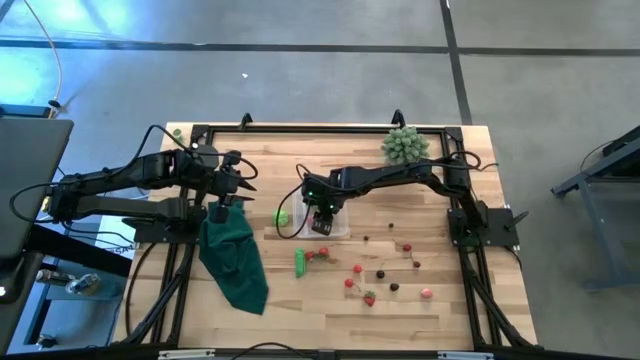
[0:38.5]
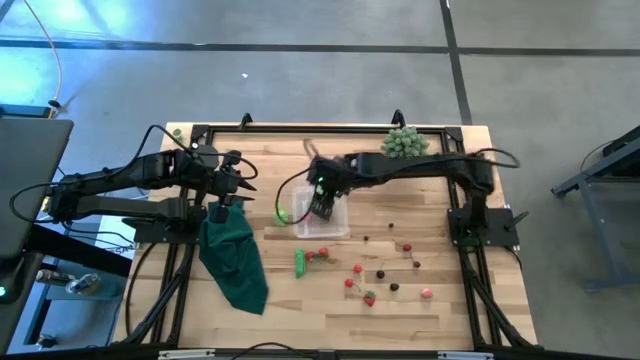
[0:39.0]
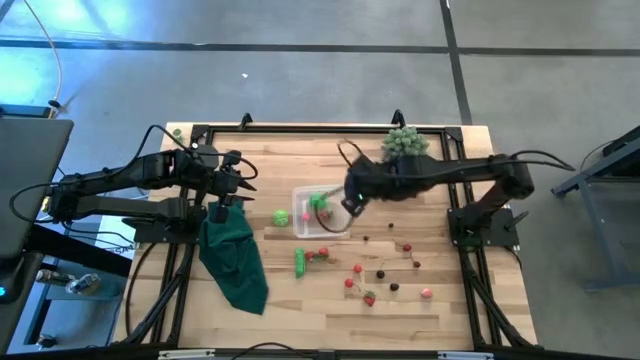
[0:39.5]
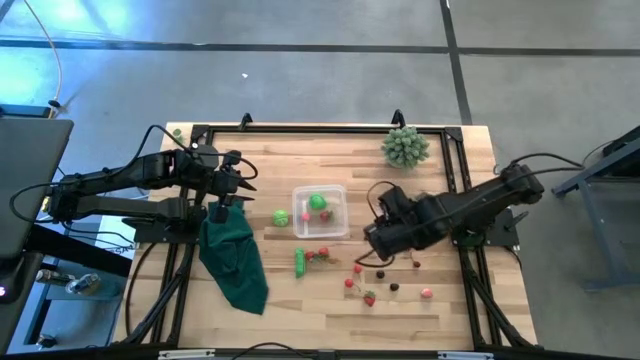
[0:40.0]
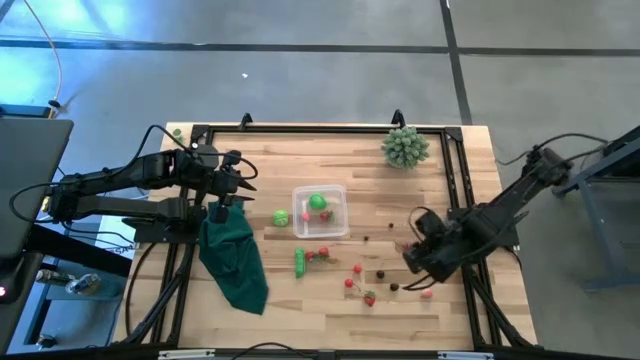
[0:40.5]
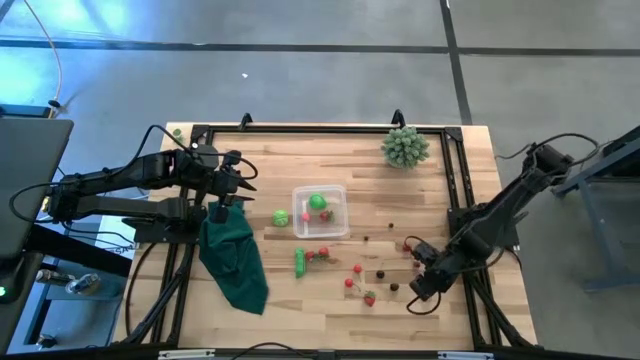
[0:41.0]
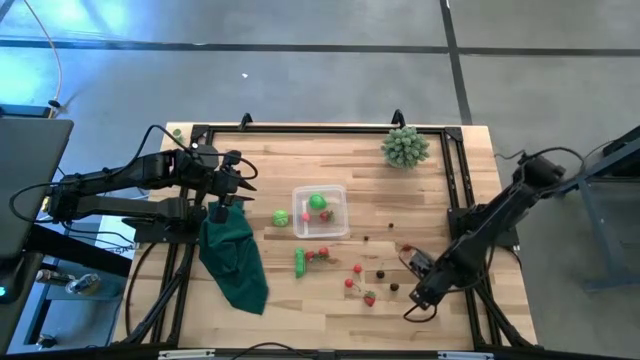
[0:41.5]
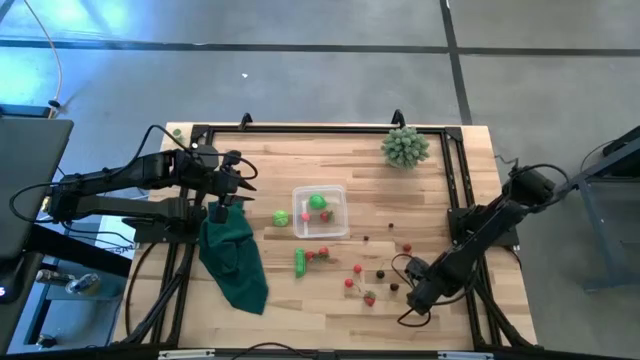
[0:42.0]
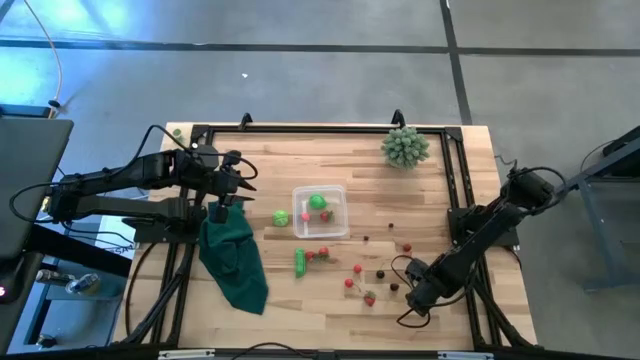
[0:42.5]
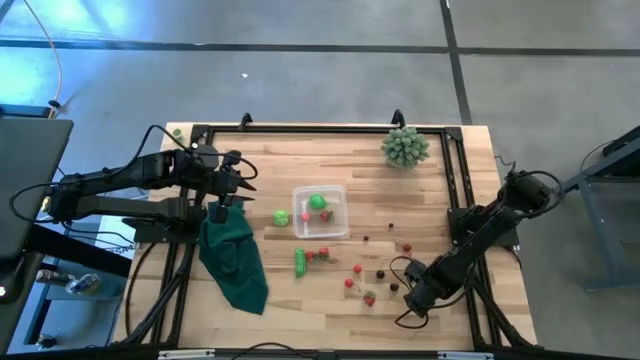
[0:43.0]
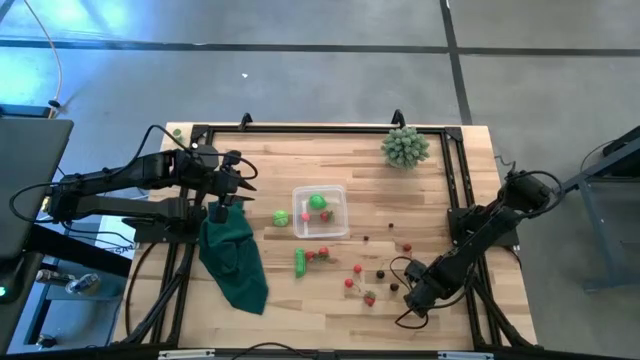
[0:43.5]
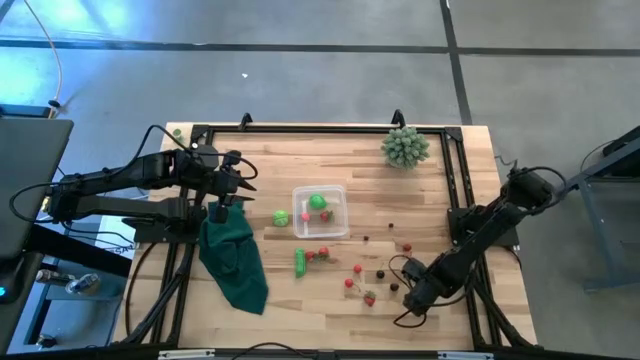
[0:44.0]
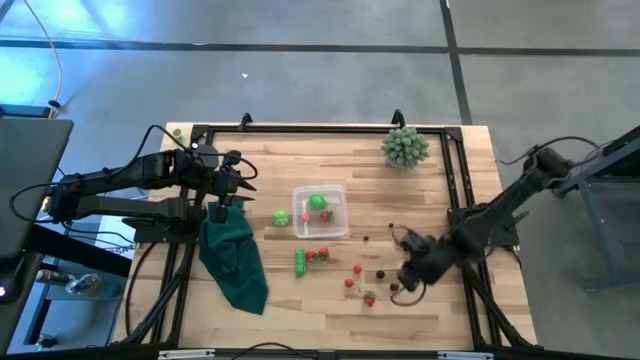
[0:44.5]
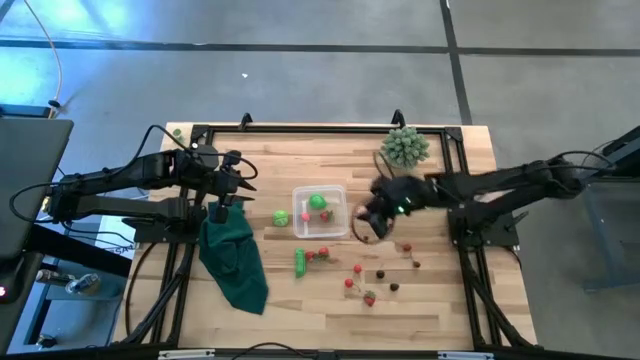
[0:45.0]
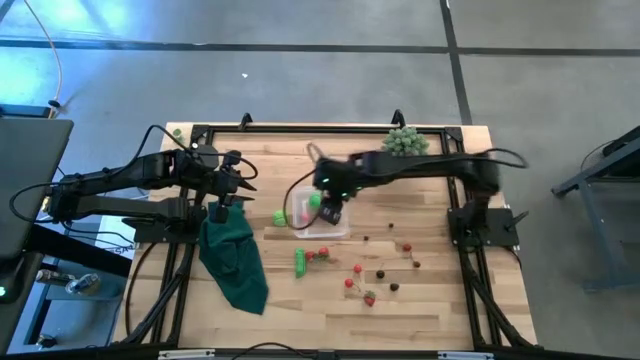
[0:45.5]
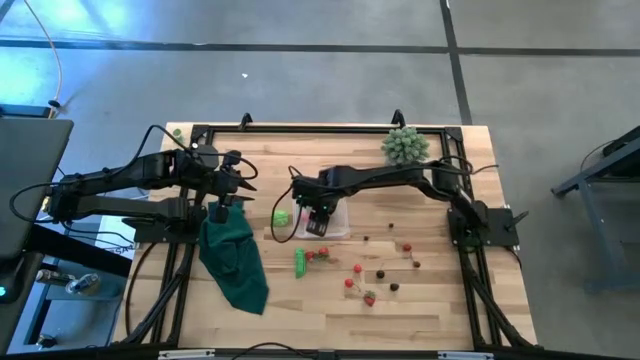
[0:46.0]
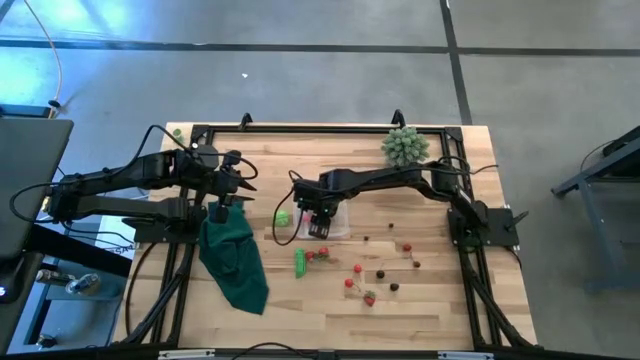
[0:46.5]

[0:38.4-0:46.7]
Task: Pick and placing Produce into tupperware
Put the peach into the transparent bin

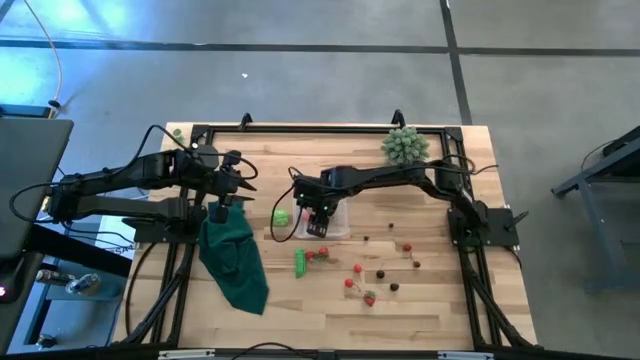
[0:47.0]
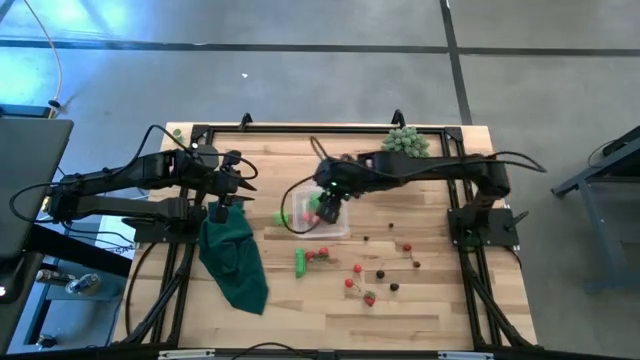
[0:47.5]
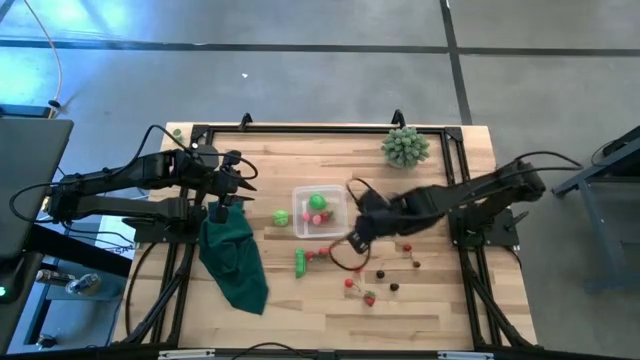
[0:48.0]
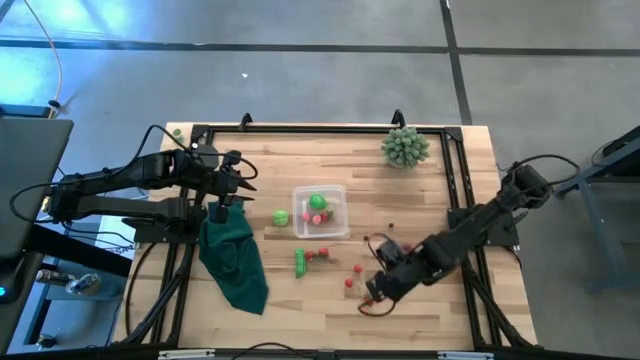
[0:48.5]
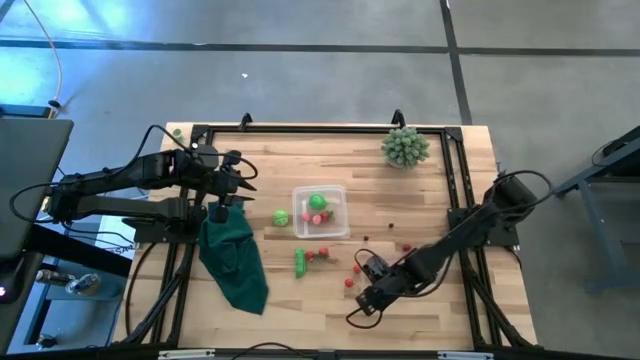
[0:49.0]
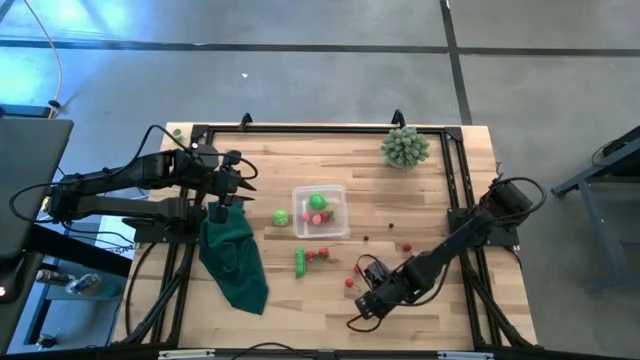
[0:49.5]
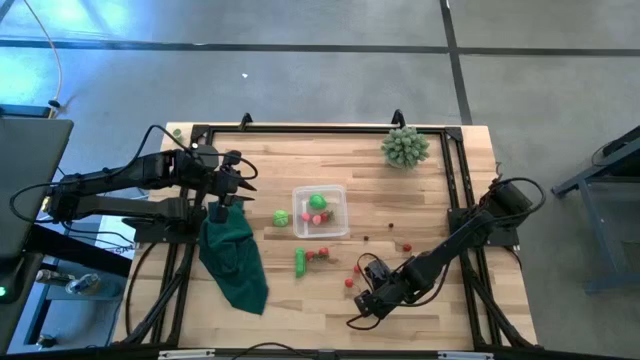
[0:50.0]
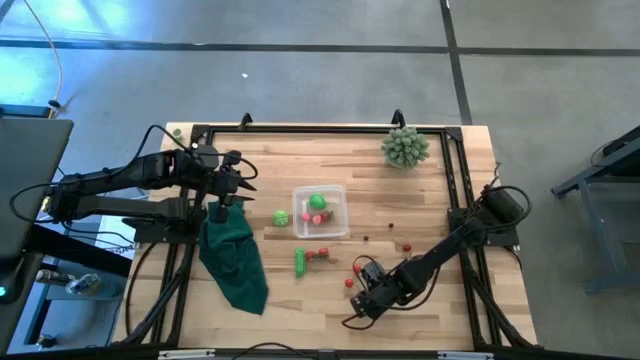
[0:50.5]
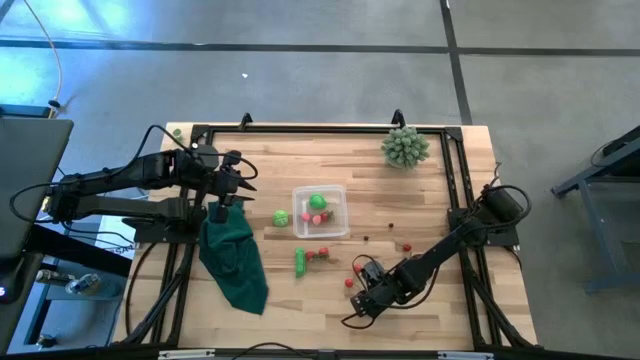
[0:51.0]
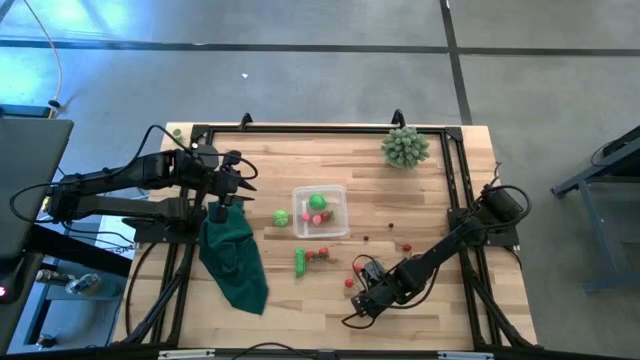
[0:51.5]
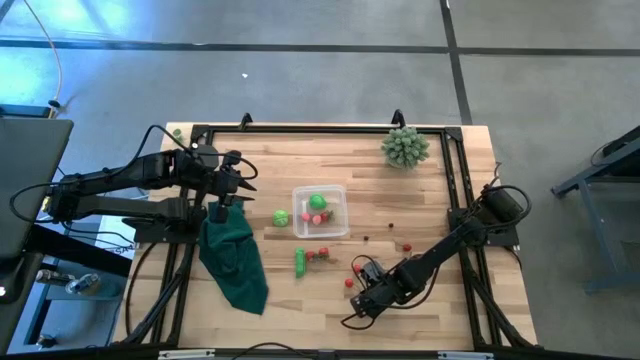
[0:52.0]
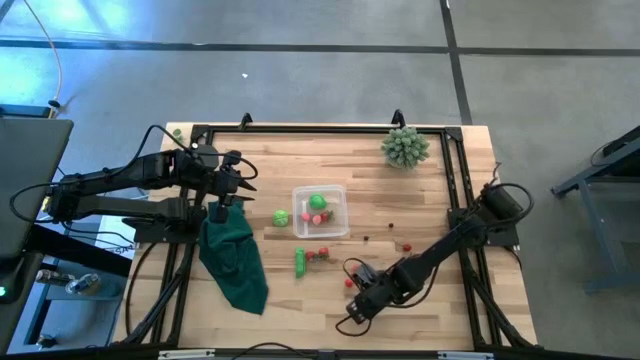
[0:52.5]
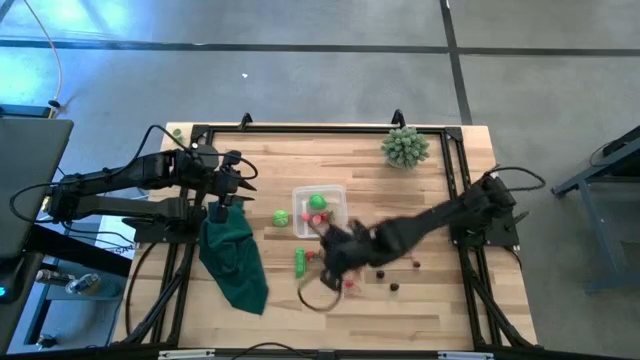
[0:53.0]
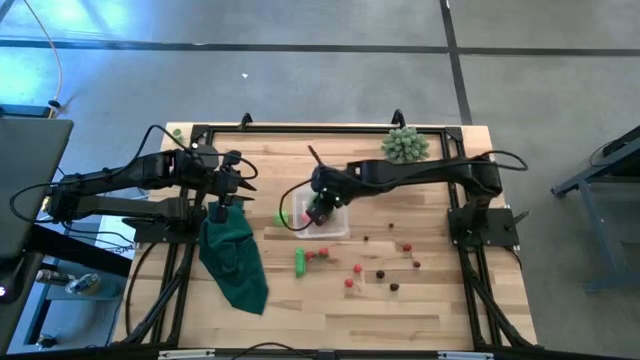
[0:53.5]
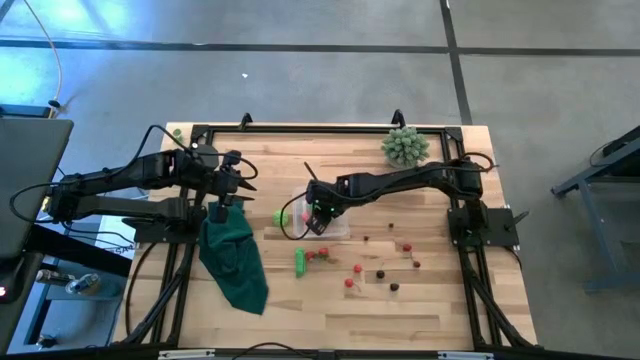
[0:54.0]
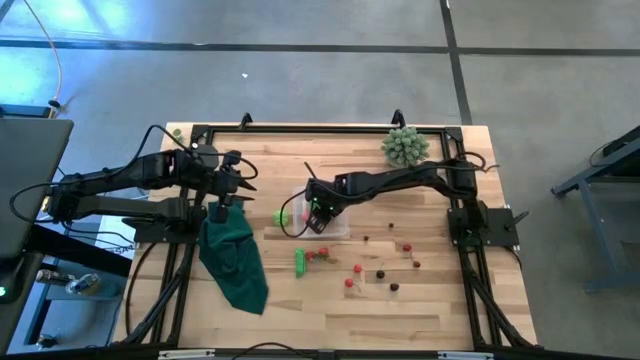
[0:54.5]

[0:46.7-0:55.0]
Put the strawberry into the transparent bin

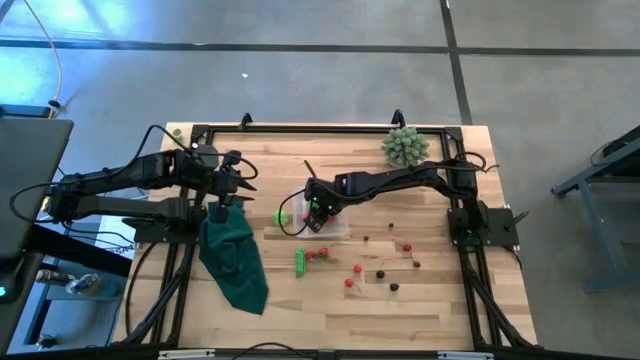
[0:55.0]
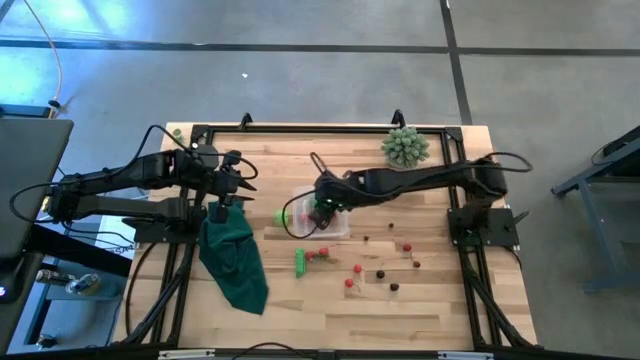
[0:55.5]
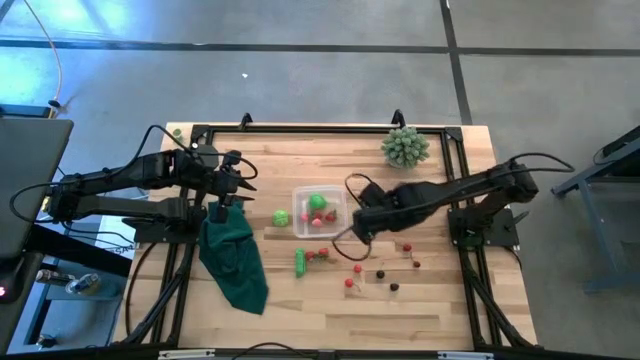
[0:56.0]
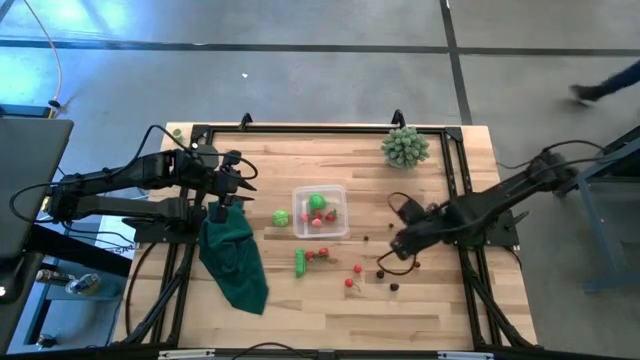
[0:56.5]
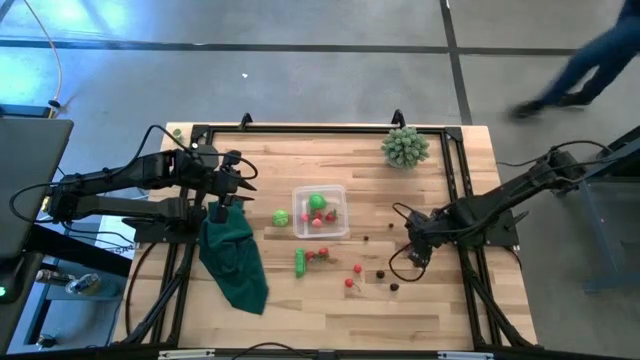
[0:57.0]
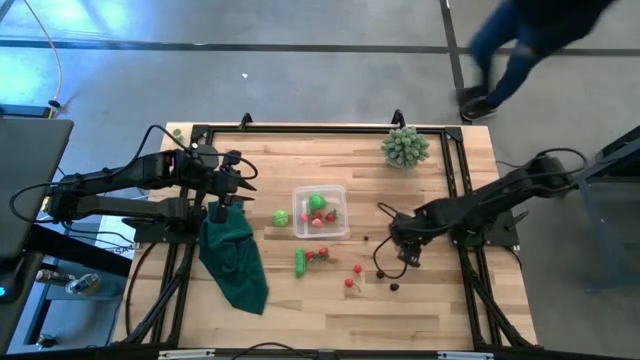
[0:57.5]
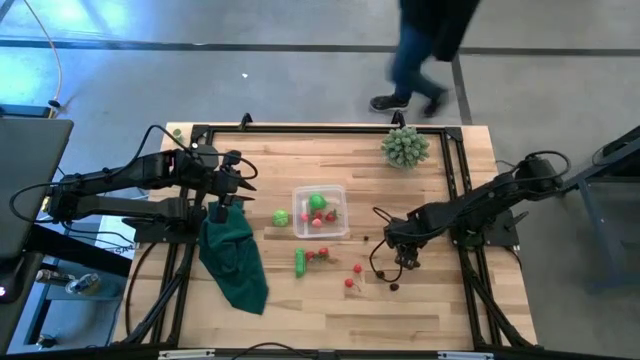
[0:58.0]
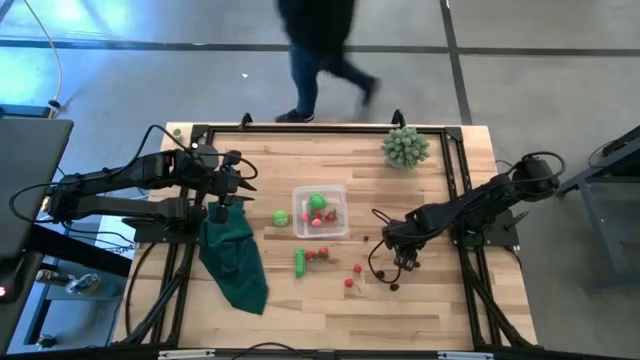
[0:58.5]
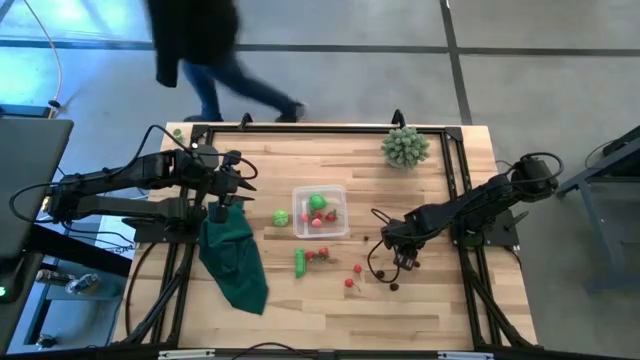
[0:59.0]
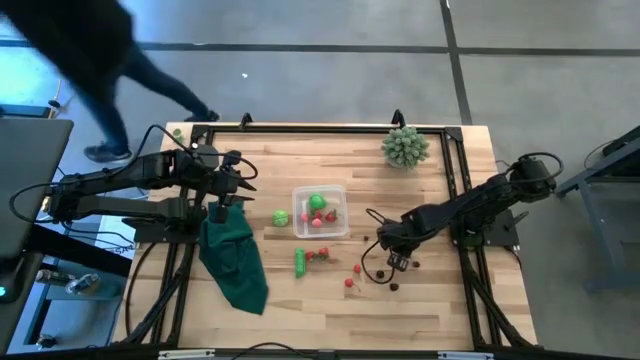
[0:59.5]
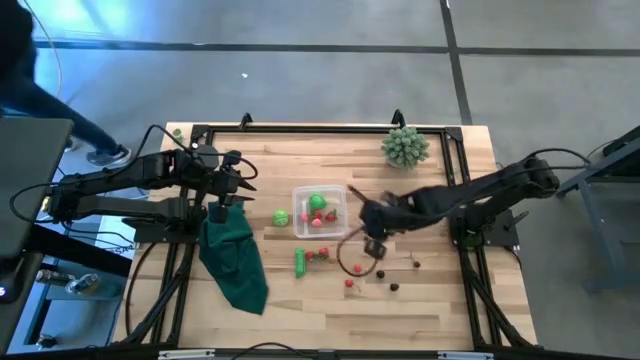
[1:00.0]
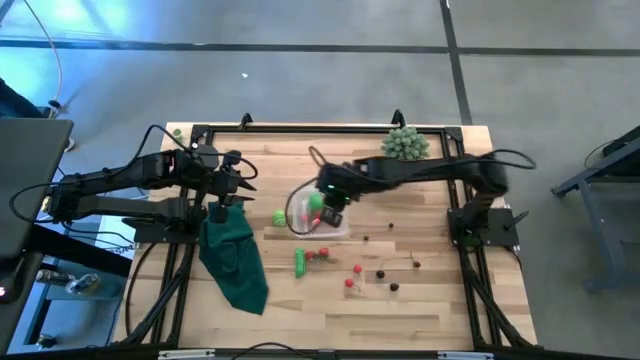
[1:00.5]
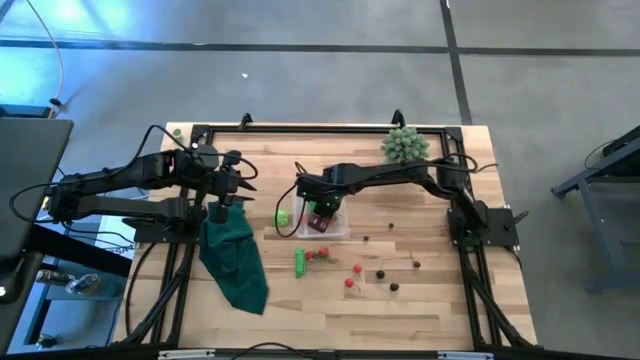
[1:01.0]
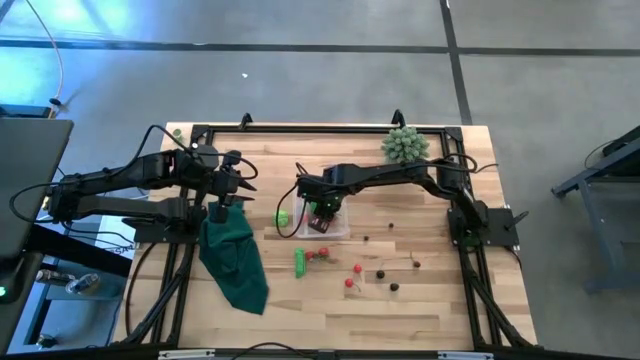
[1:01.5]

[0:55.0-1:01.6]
Put the red cherry into the transparent bin
